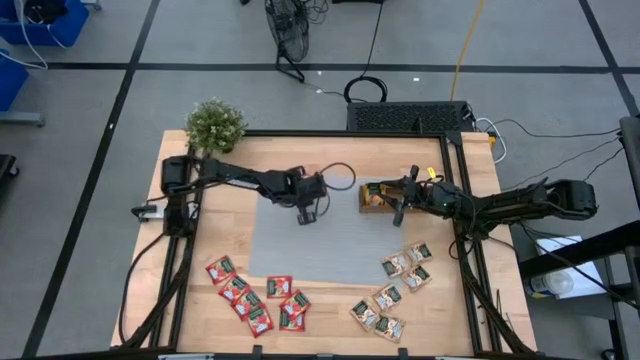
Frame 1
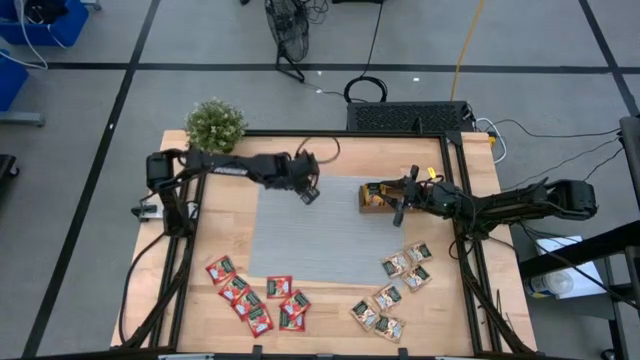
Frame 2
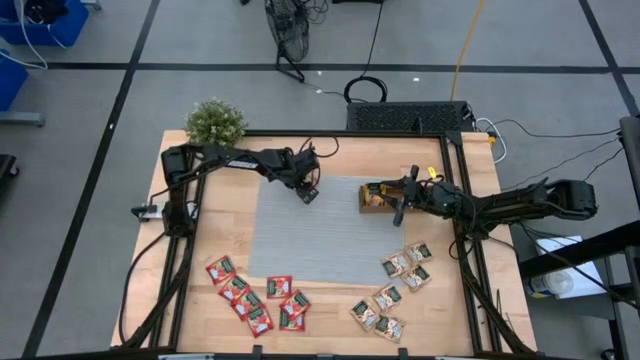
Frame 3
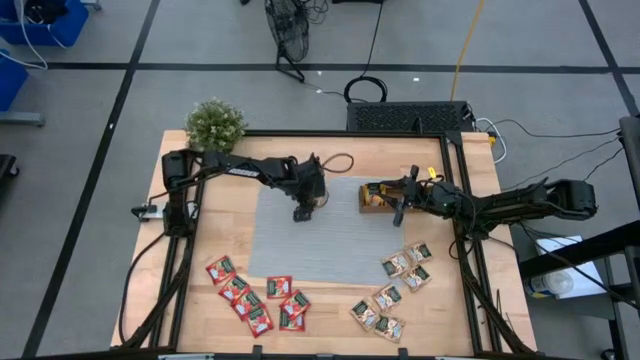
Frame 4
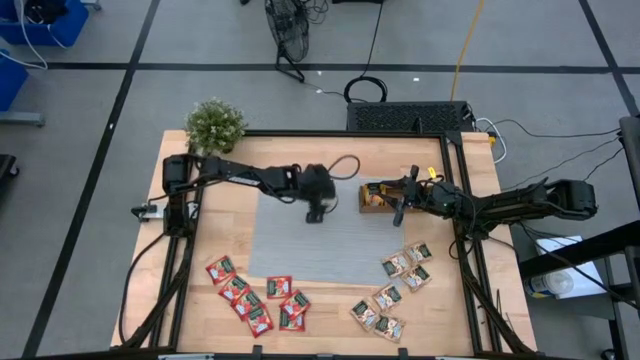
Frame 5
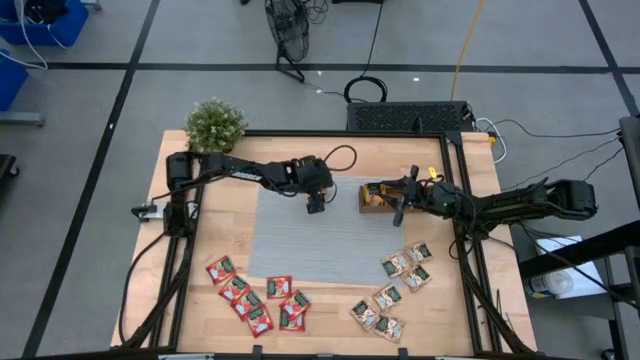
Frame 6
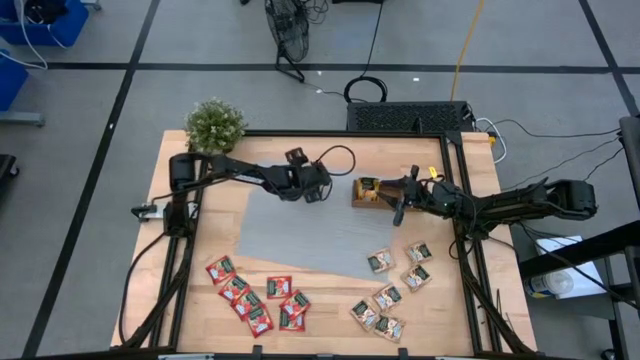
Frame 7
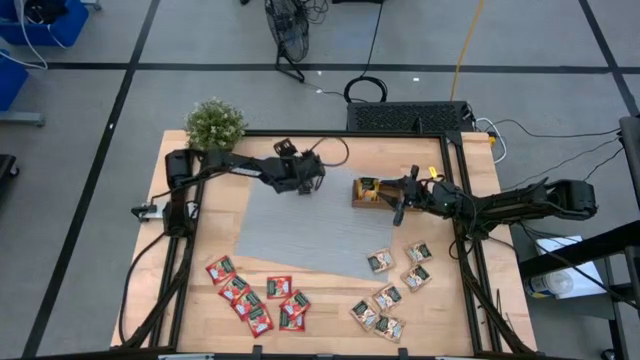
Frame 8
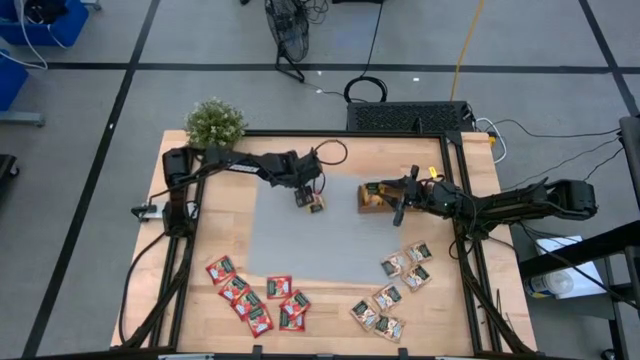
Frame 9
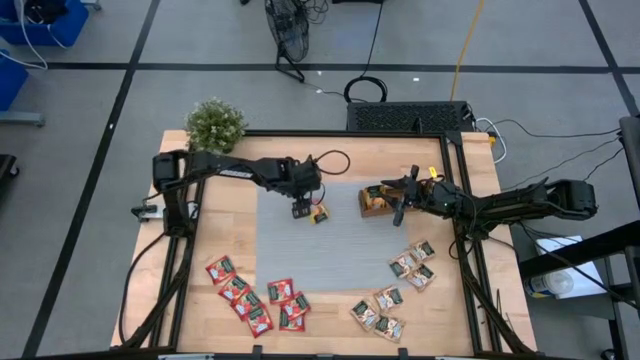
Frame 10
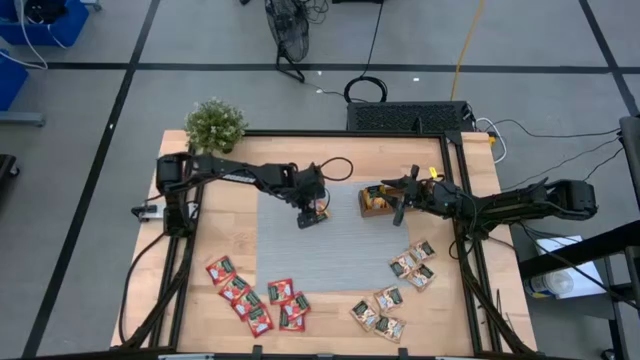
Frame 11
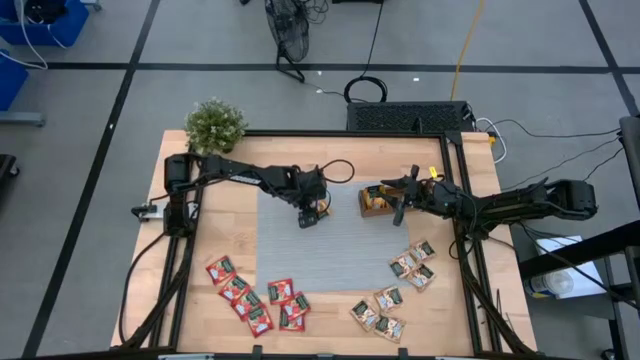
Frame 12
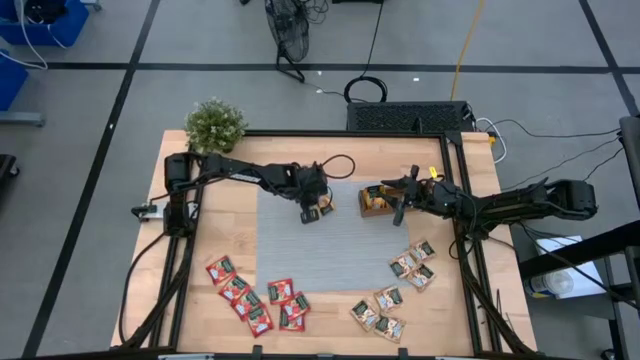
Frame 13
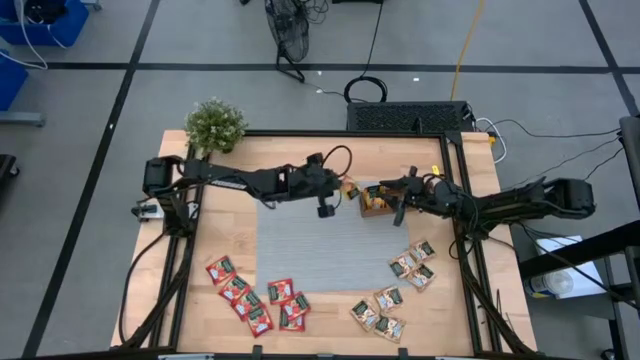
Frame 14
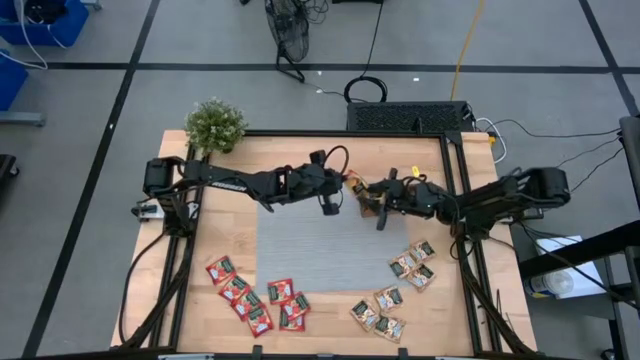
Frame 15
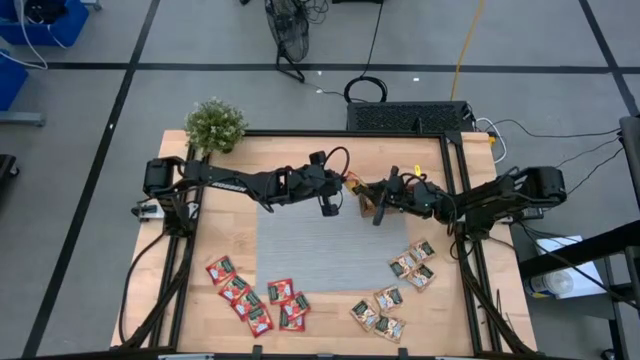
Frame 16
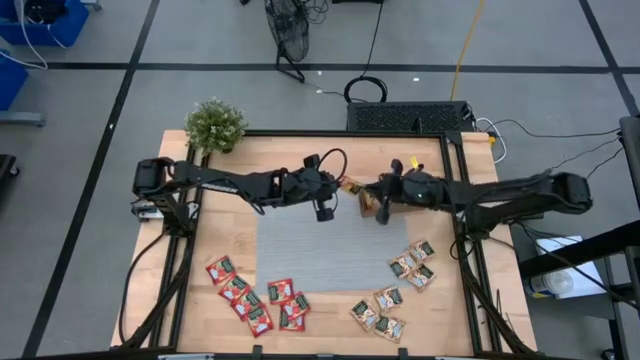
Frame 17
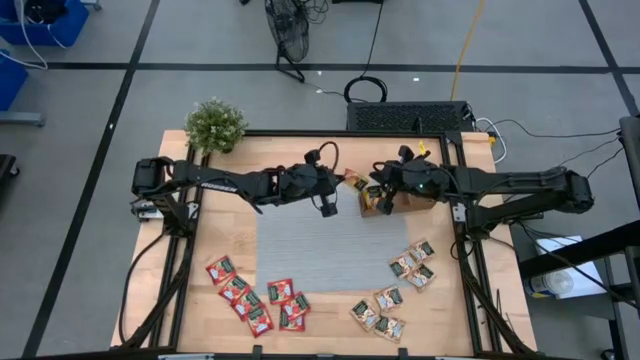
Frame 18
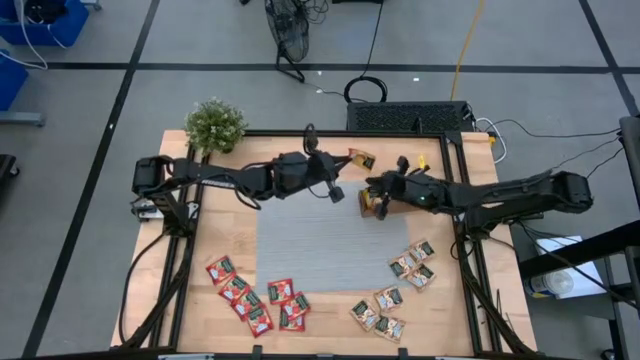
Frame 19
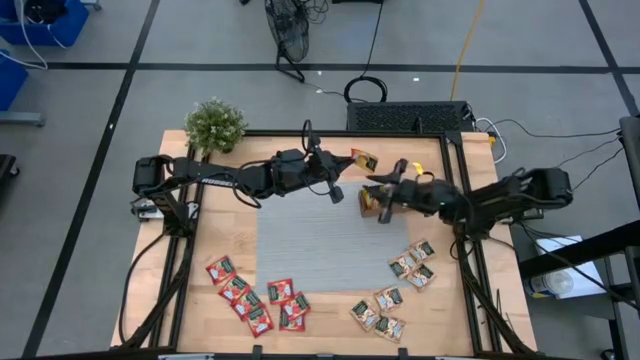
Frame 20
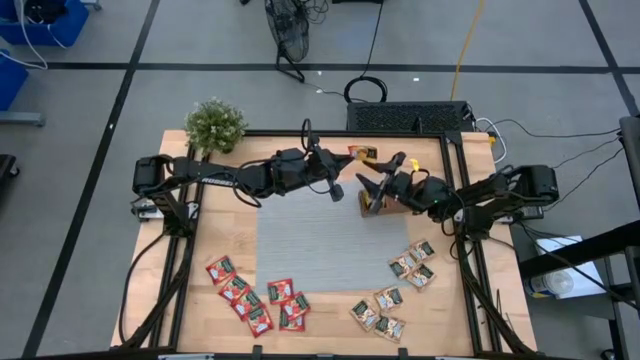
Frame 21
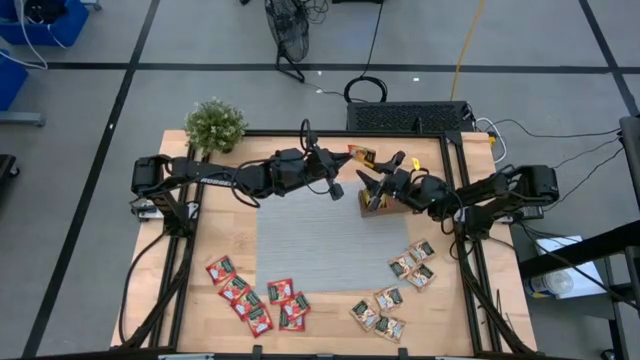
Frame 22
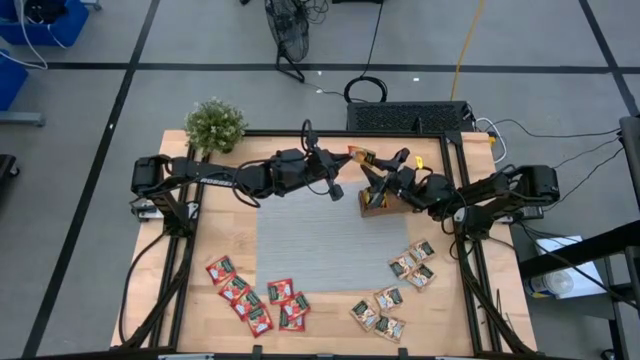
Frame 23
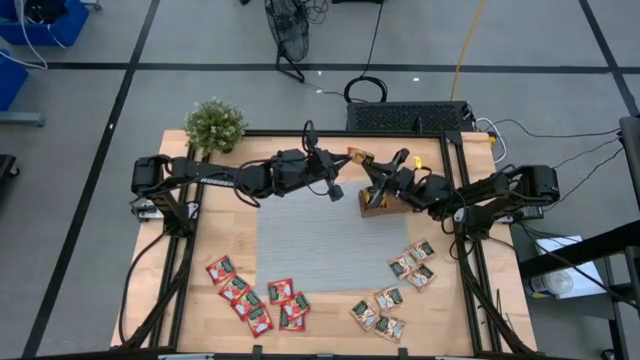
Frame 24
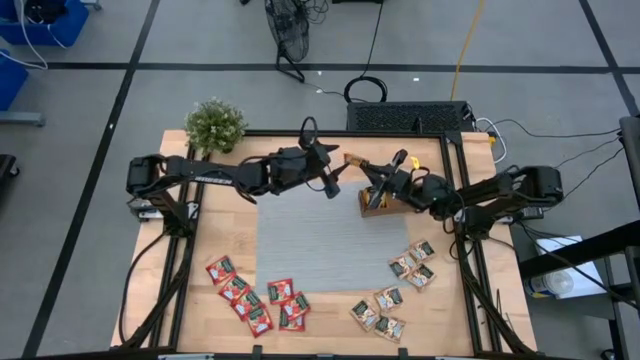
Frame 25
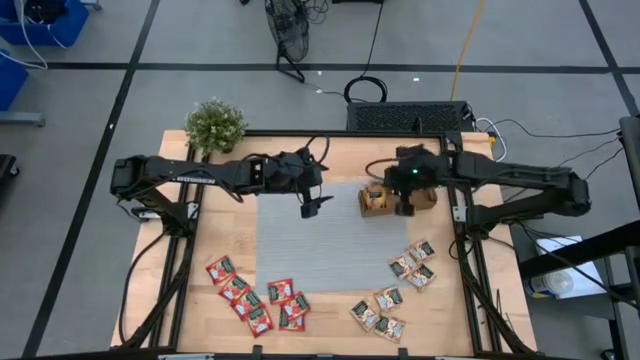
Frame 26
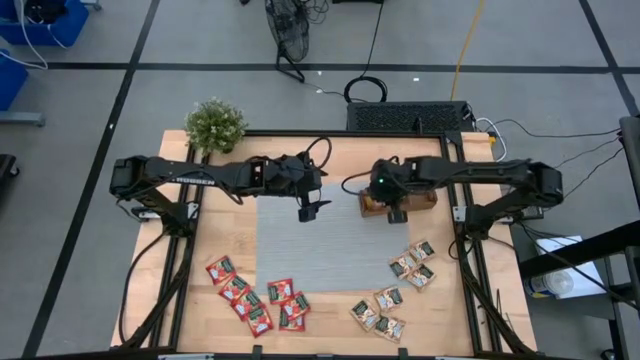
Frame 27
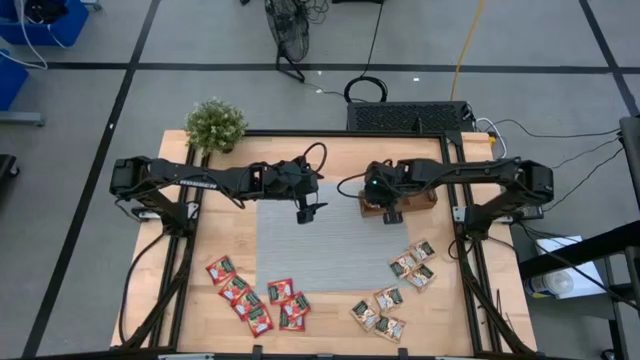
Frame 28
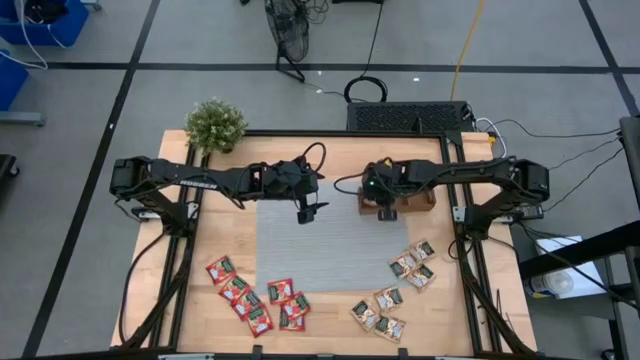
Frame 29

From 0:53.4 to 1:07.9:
Task: Pick & Place Tea
Put the yellow tea bag into the left section of the wooden organizer

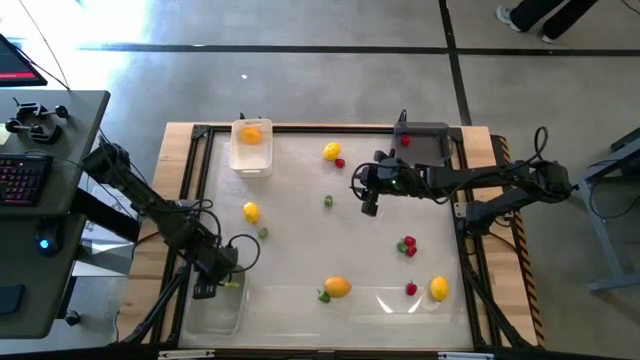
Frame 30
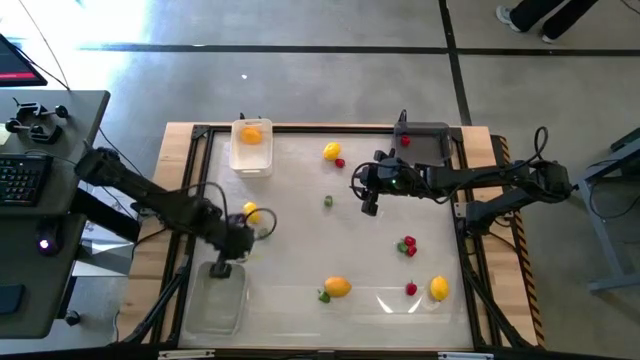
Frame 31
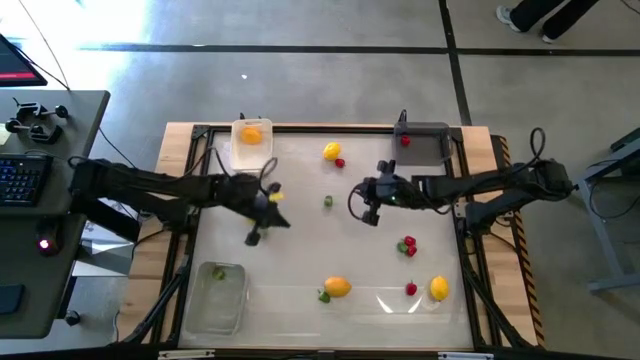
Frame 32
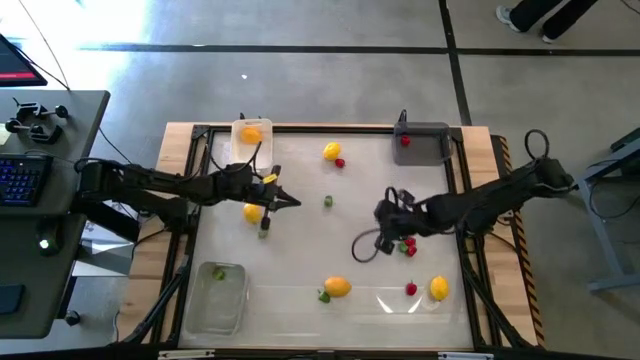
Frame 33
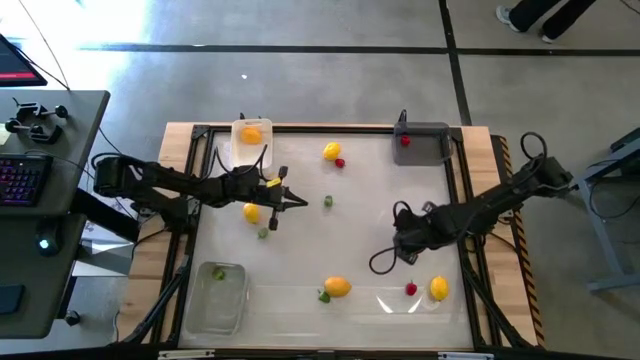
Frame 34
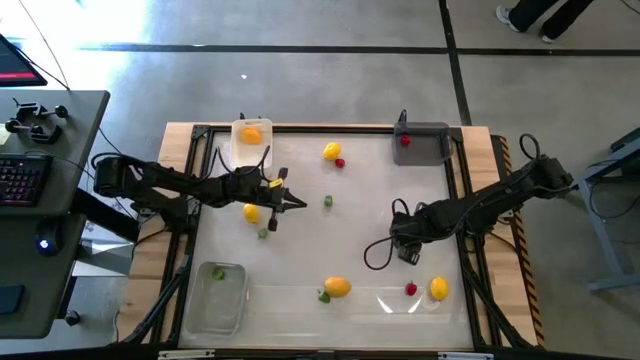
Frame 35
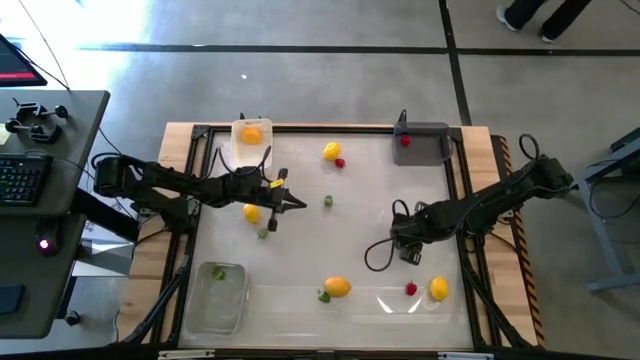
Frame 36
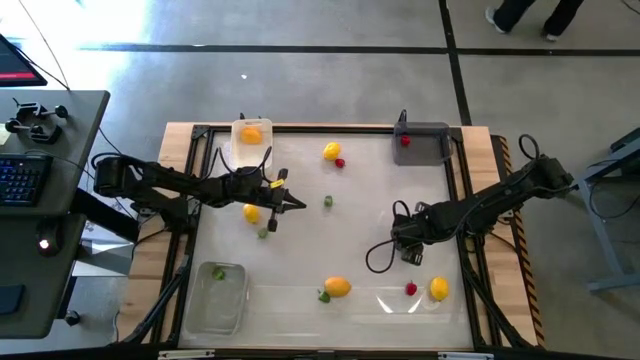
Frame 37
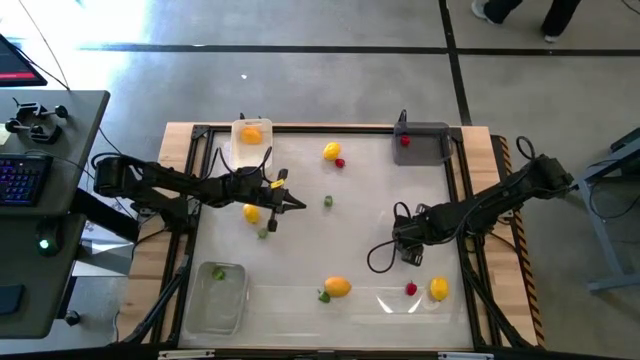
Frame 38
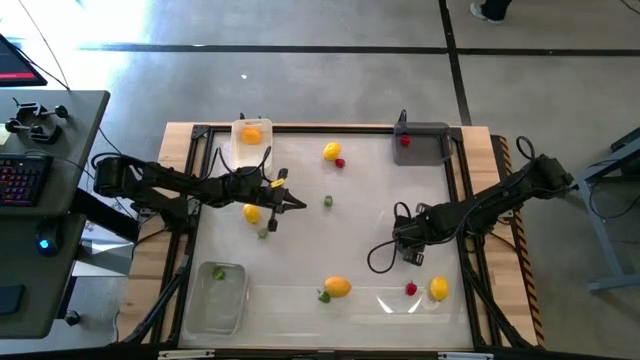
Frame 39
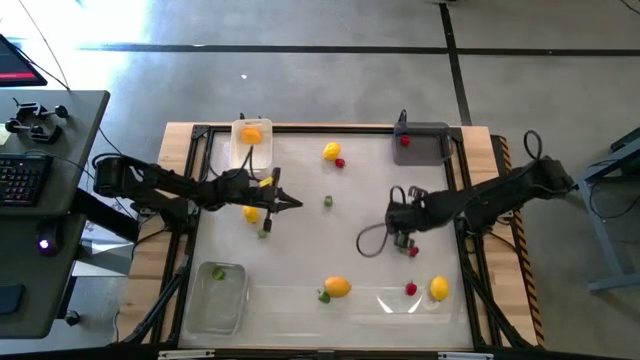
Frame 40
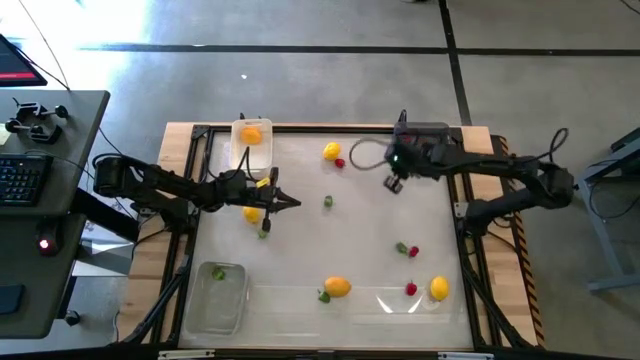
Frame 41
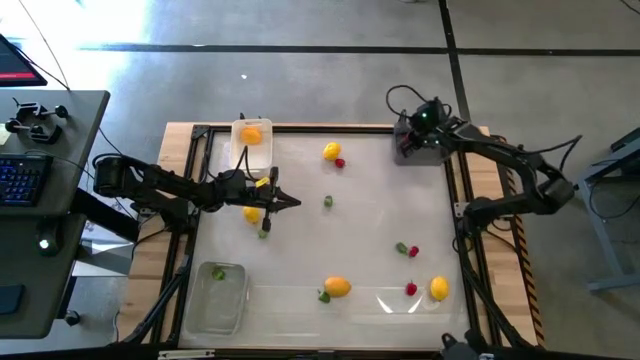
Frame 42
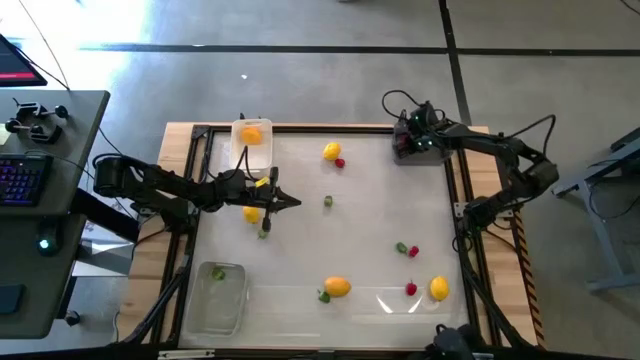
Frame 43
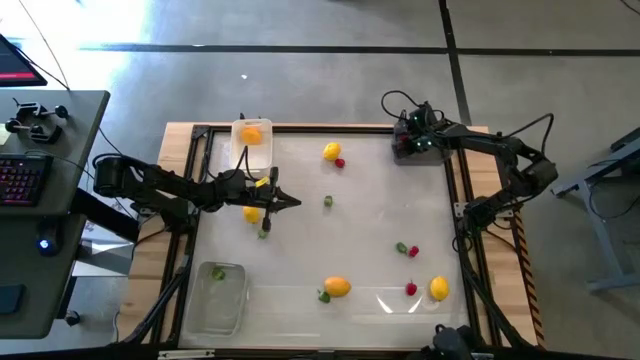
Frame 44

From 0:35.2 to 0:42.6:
Task: Sort produce into baskets
Put the red bell pepper into the black bin
